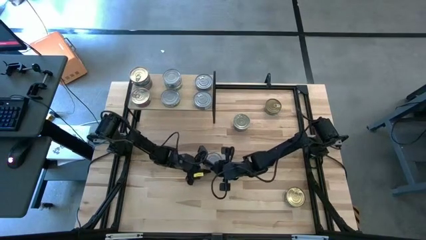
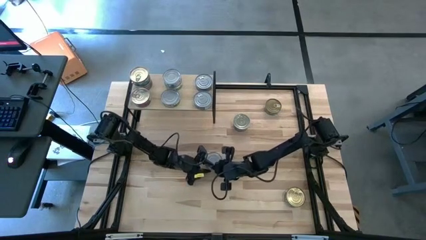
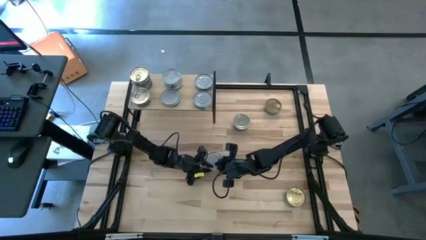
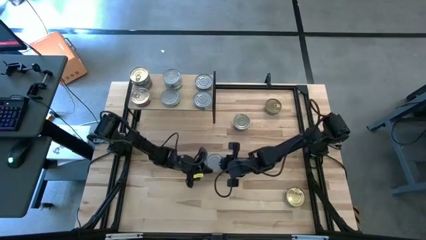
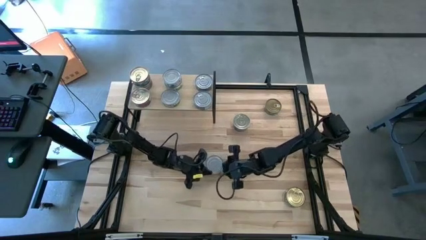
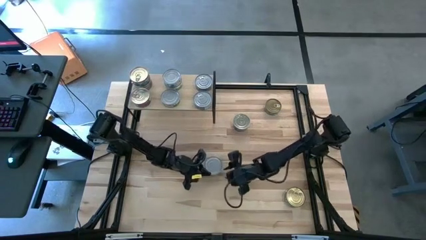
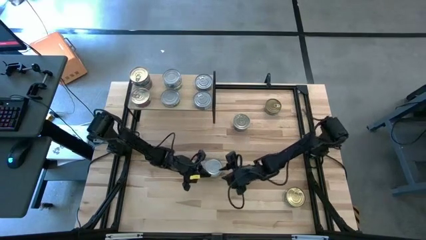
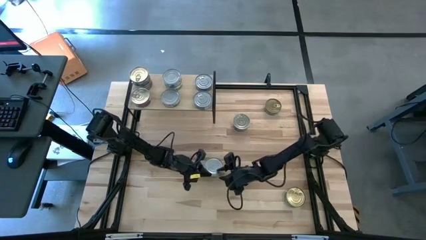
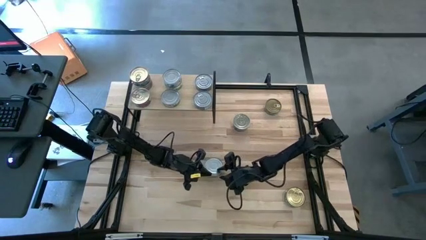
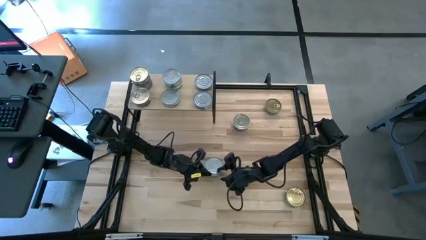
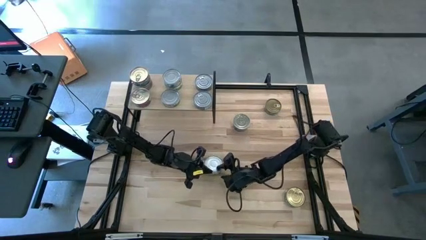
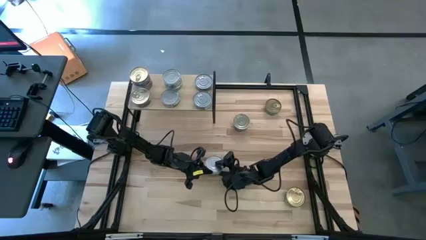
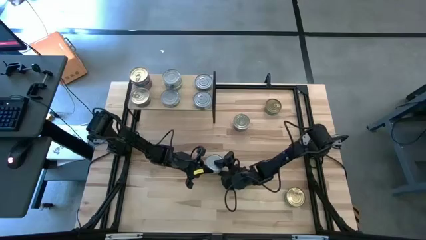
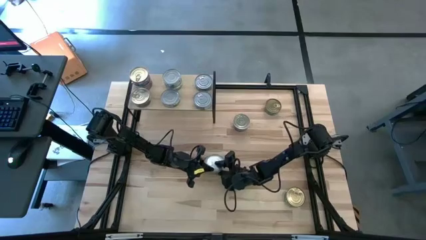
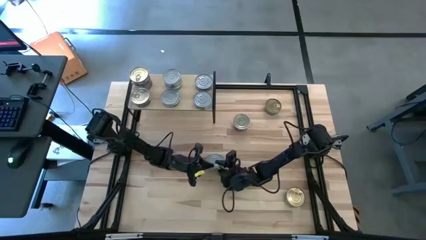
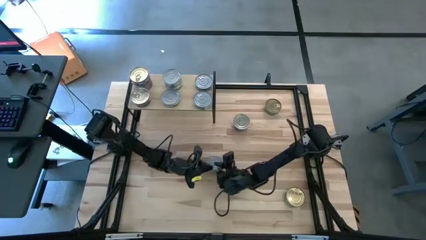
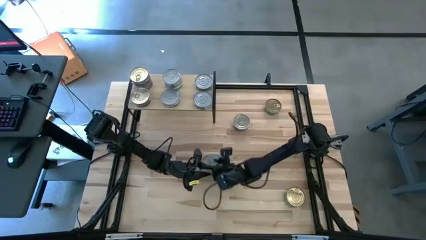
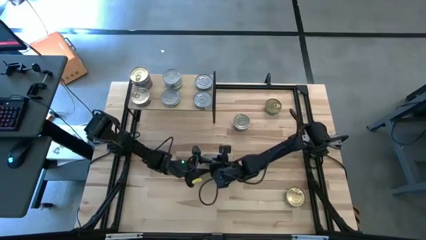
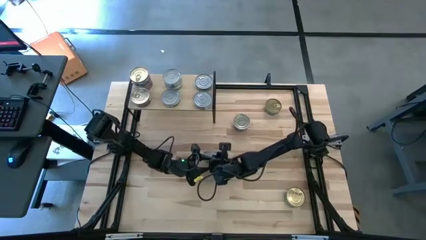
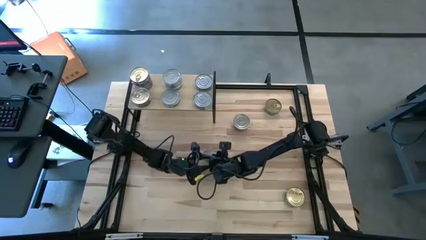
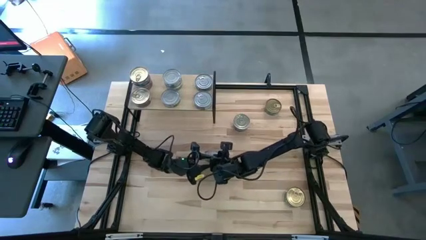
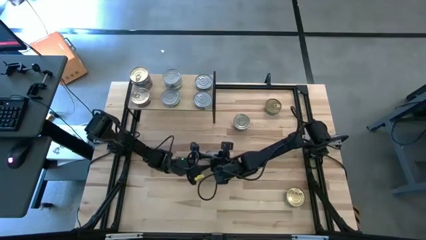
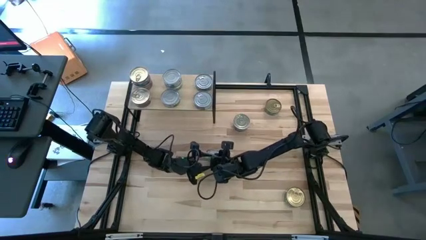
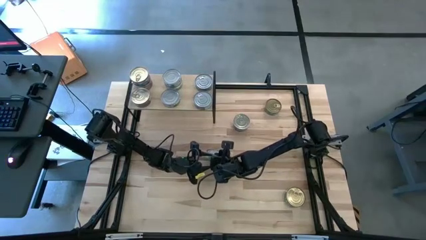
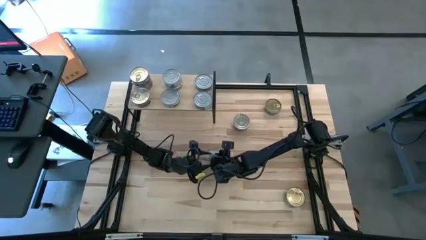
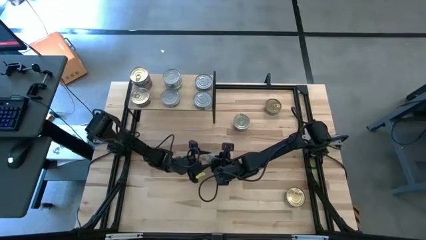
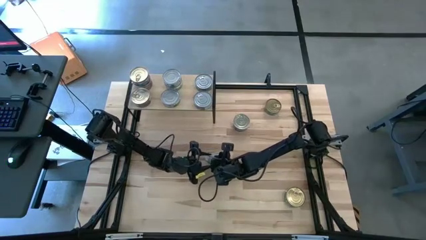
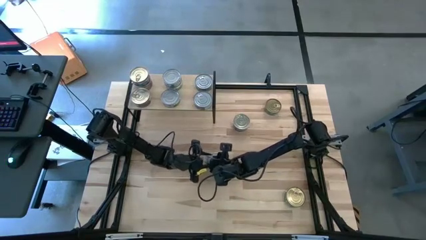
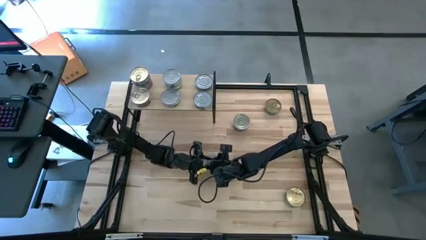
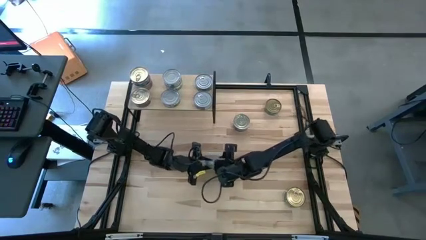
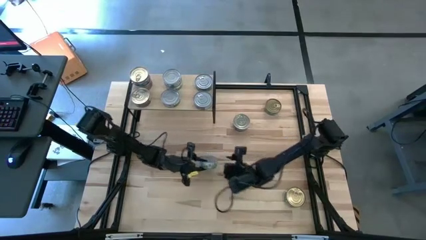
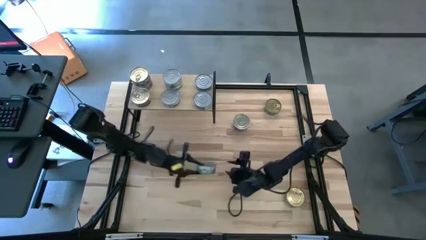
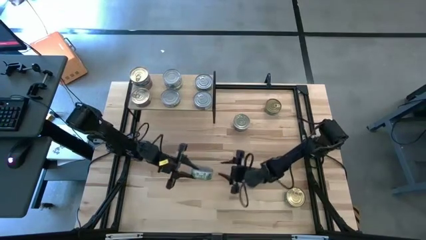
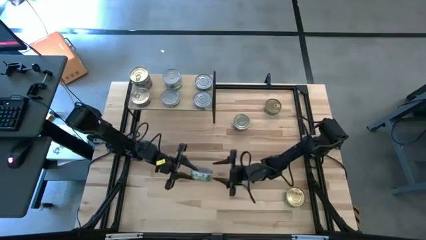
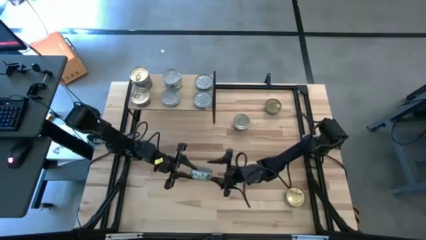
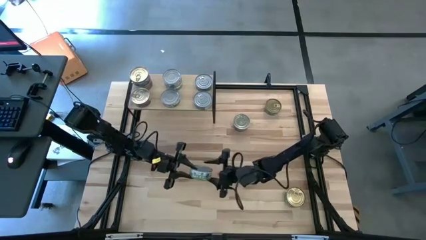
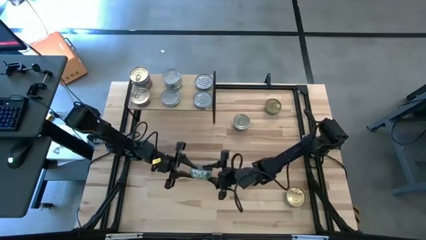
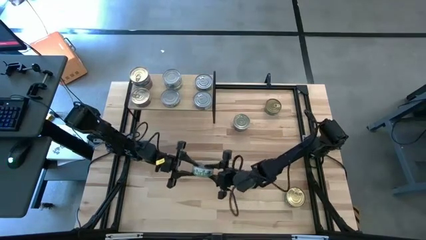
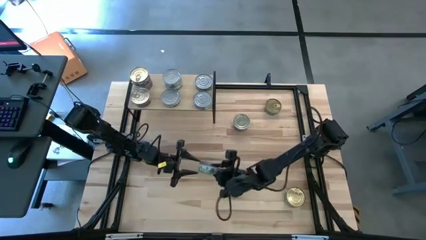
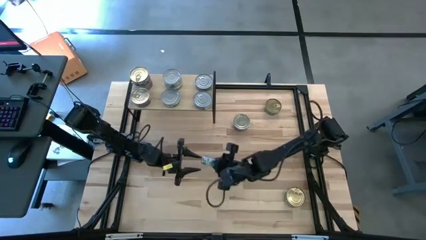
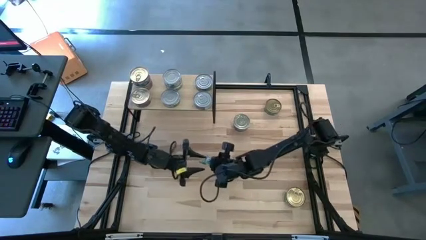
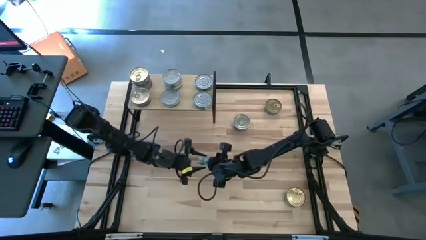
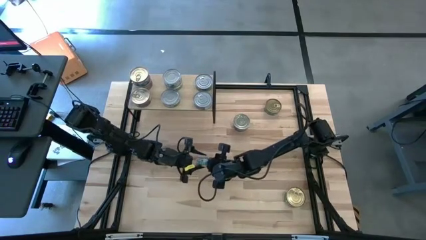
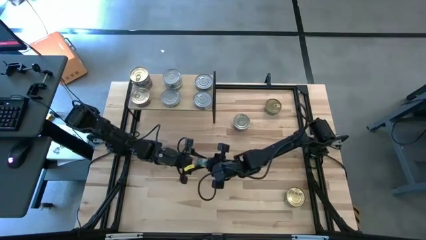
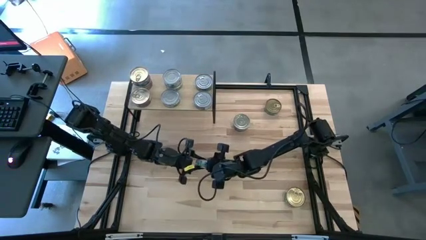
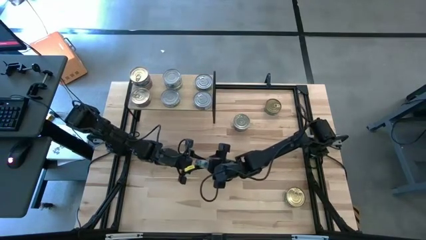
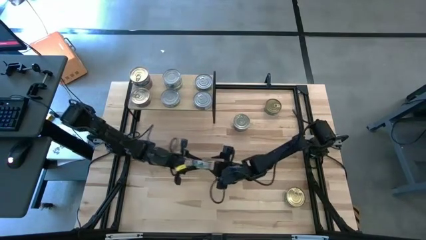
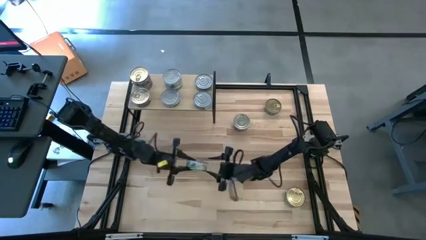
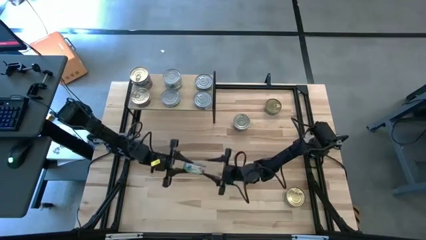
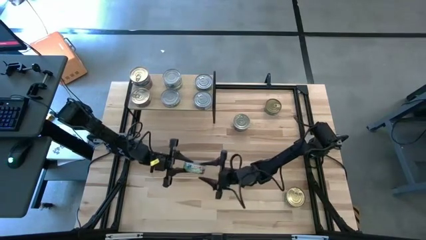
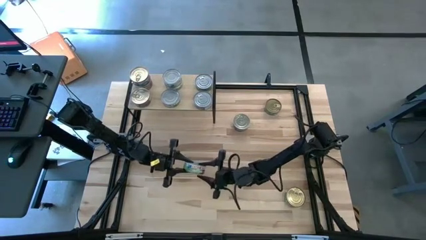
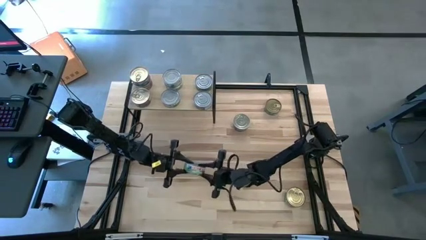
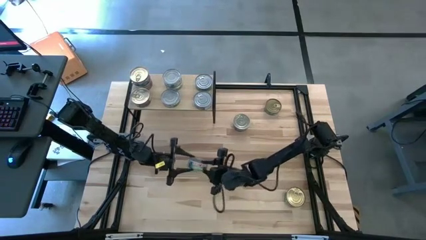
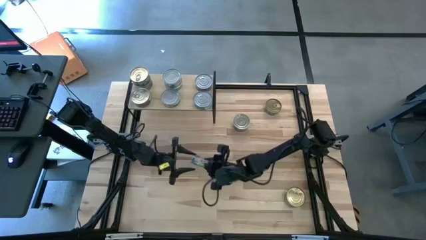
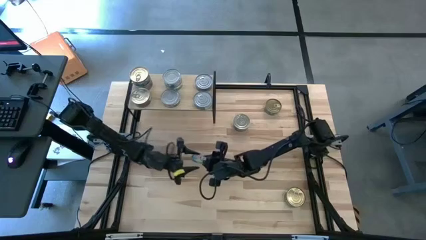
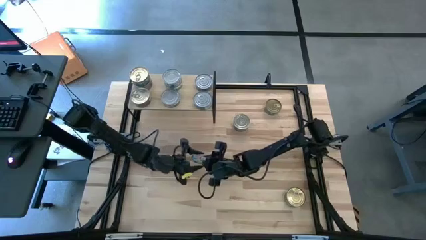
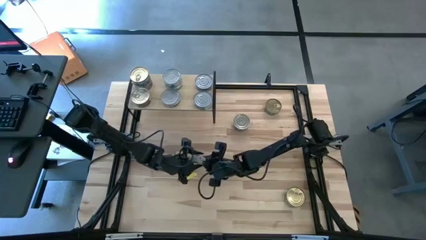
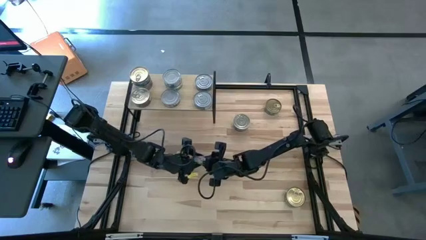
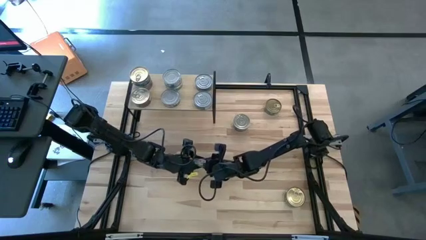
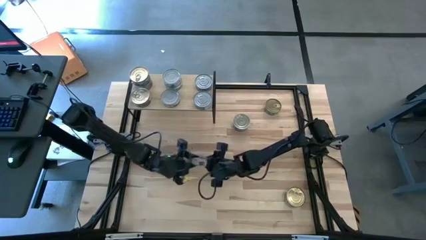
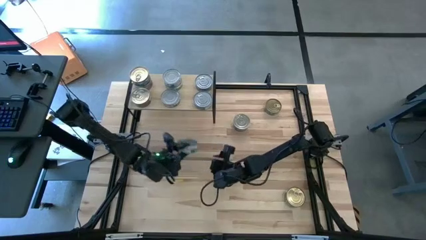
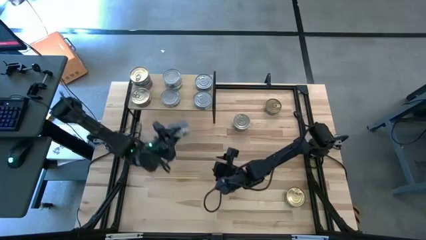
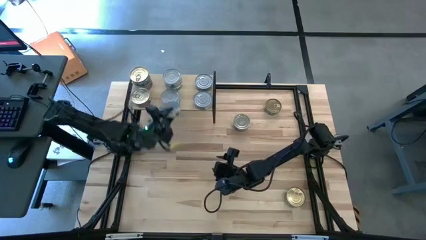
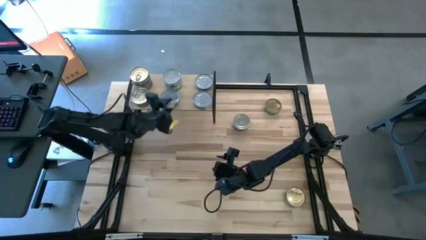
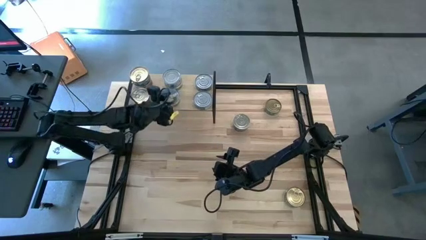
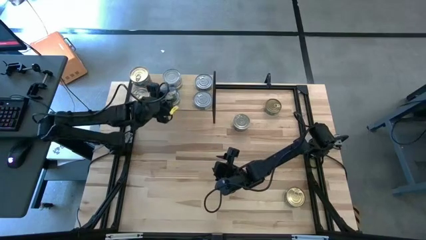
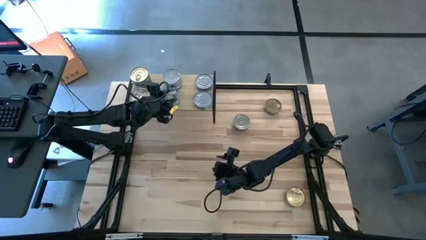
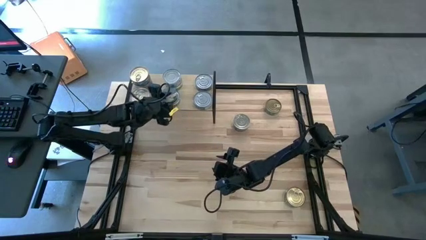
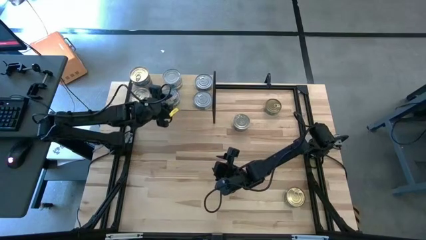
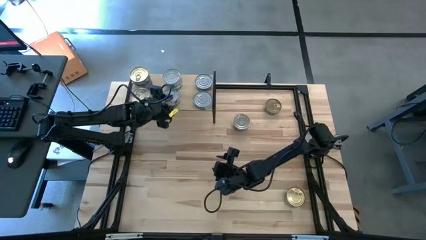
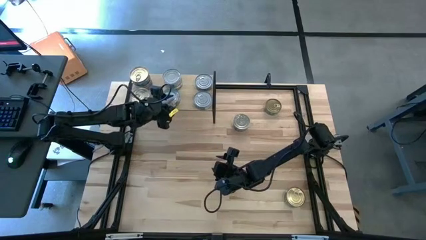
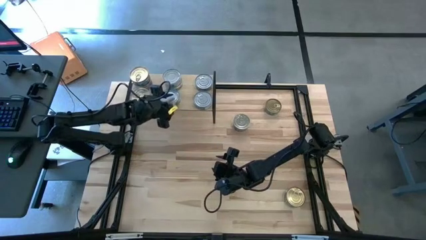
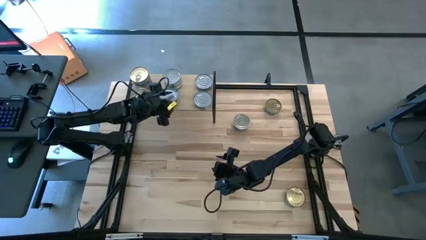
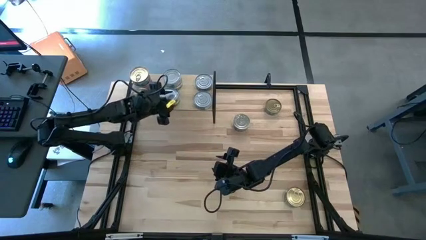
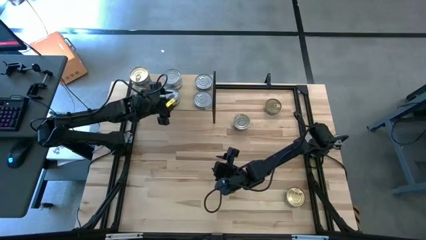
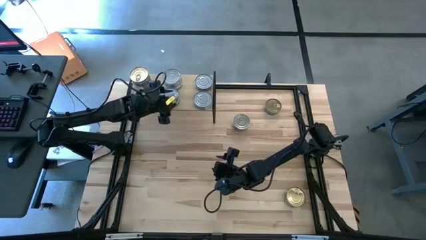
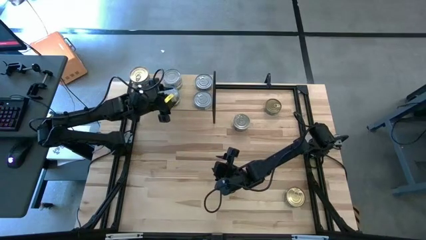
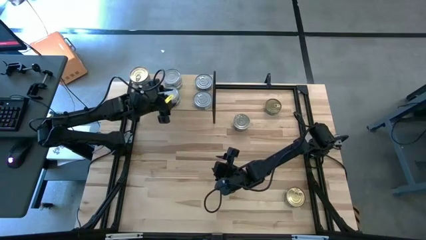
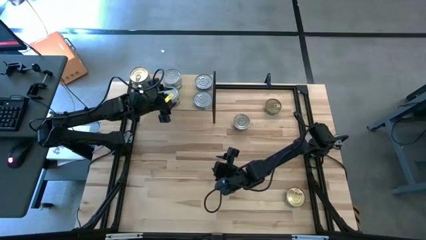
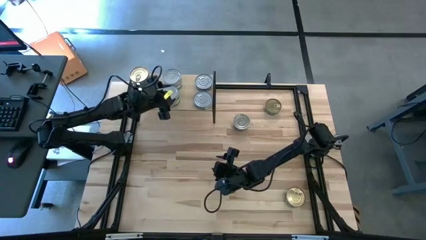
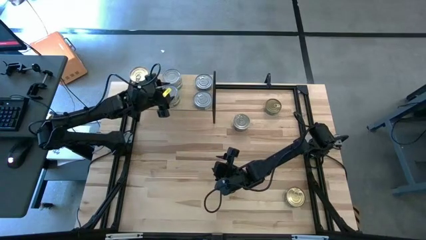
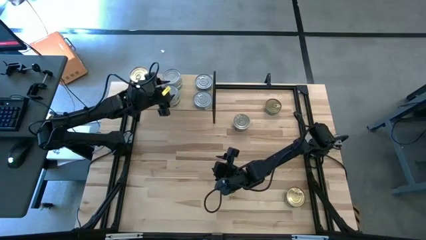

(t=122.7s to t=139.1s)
Task: Stack canned seafood by type on shelf
Stack the green white tuna can on top of the other green white tuna can on the shelf
